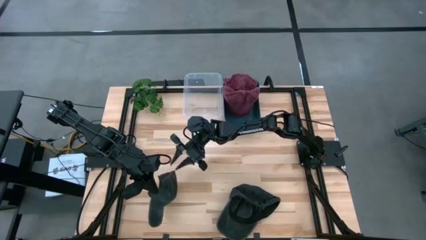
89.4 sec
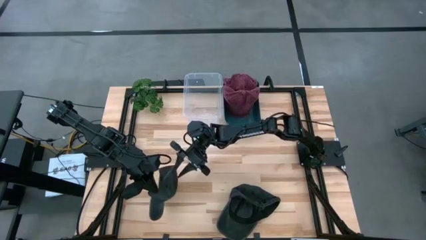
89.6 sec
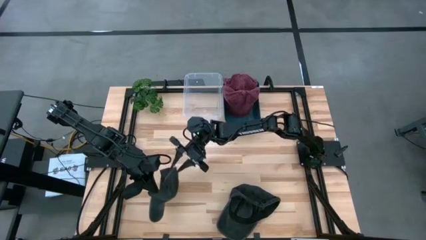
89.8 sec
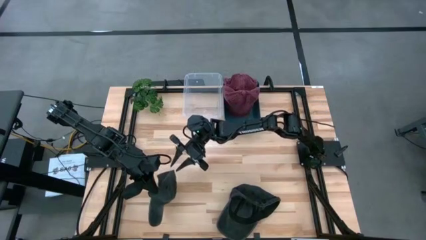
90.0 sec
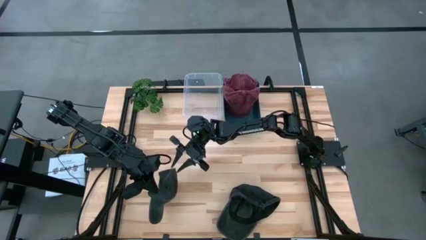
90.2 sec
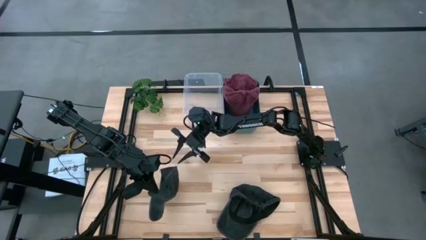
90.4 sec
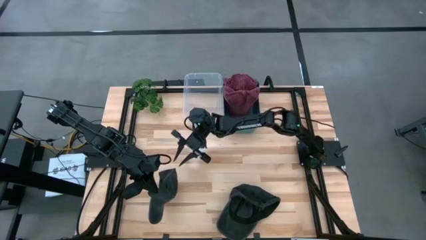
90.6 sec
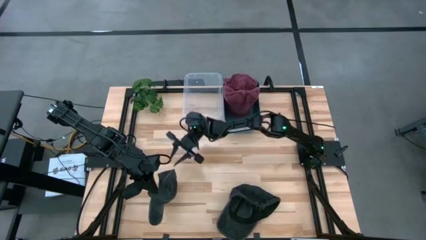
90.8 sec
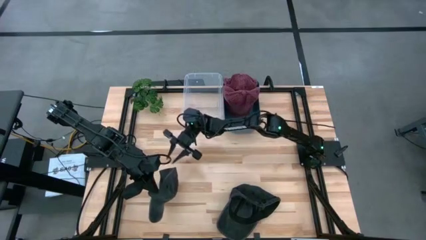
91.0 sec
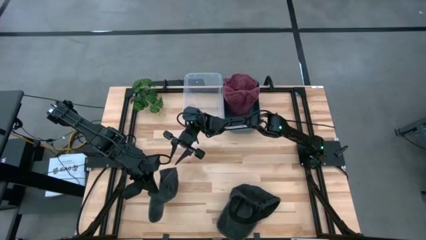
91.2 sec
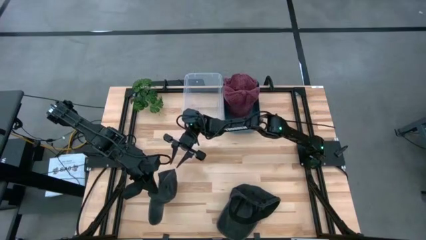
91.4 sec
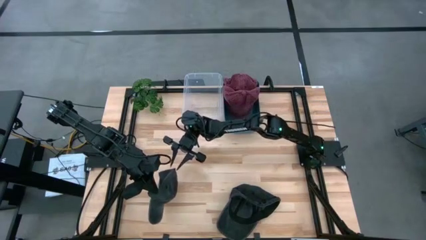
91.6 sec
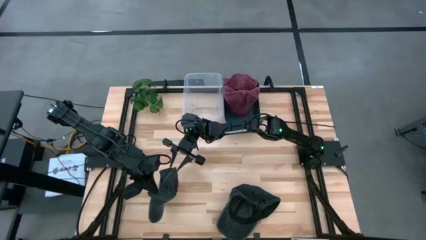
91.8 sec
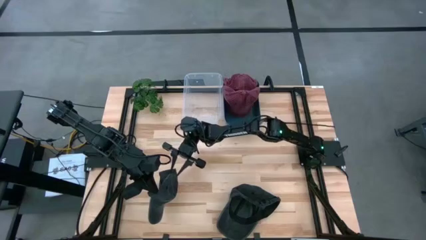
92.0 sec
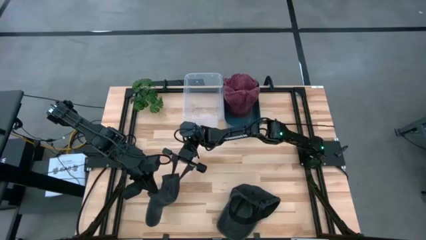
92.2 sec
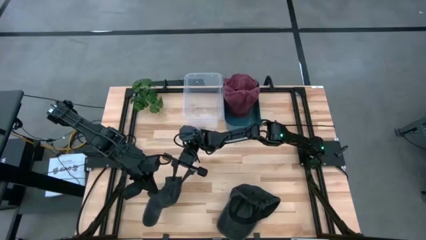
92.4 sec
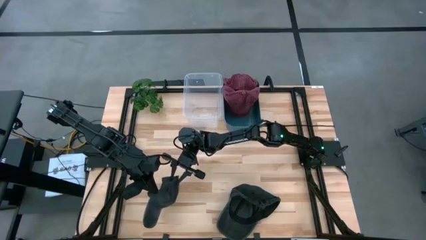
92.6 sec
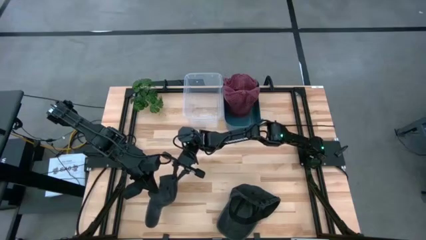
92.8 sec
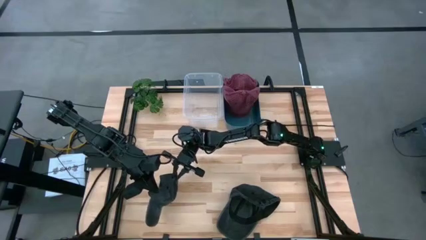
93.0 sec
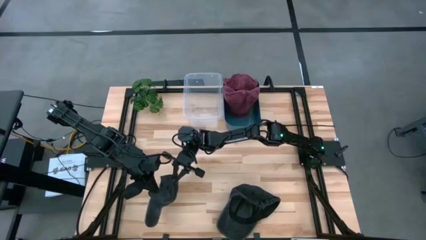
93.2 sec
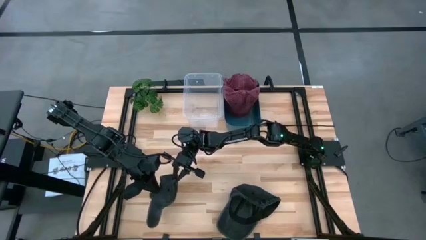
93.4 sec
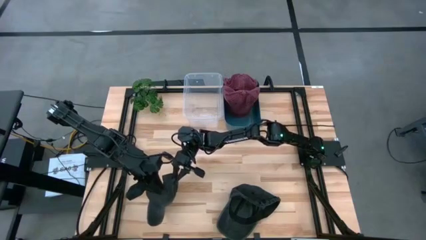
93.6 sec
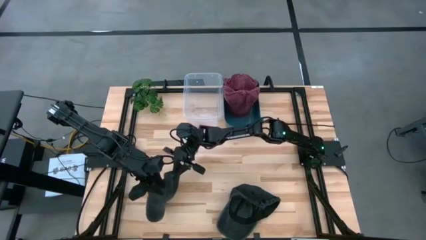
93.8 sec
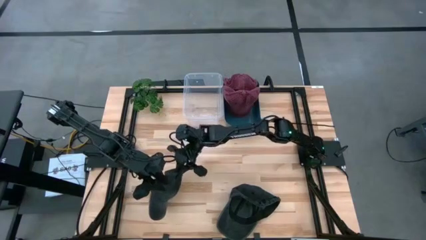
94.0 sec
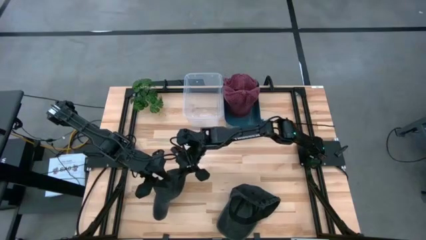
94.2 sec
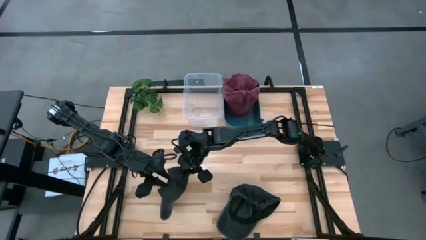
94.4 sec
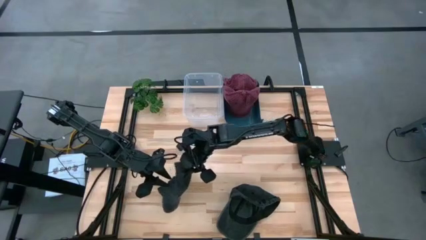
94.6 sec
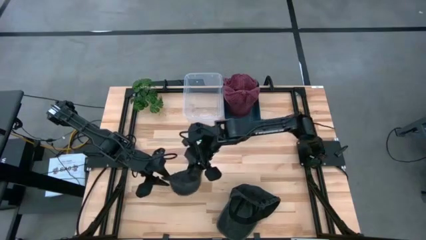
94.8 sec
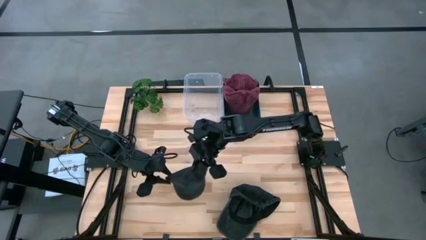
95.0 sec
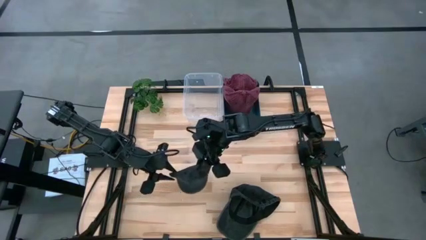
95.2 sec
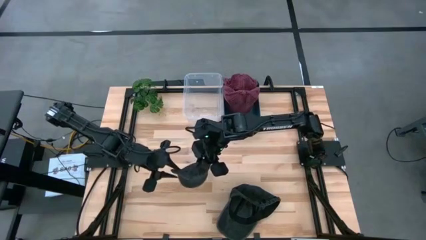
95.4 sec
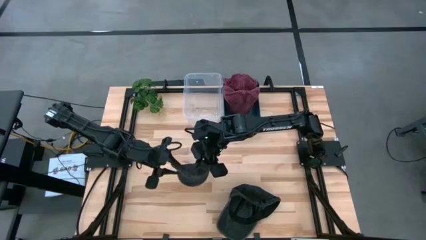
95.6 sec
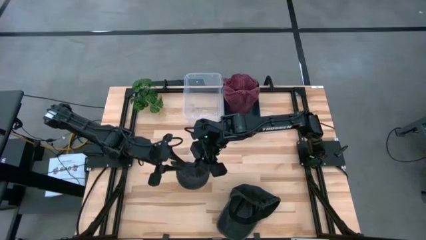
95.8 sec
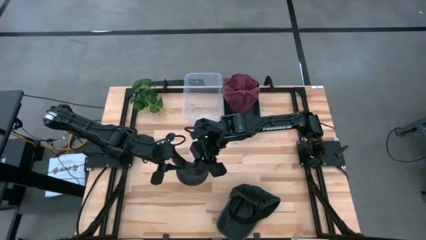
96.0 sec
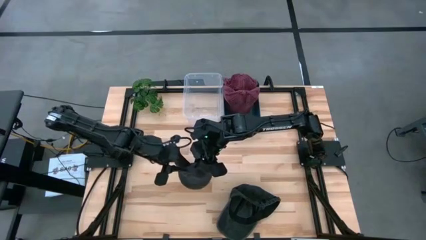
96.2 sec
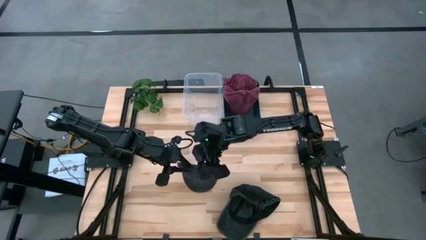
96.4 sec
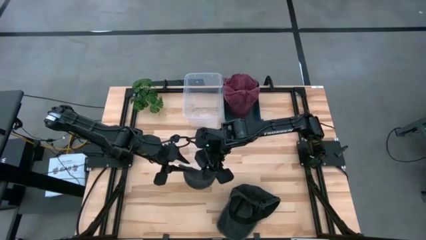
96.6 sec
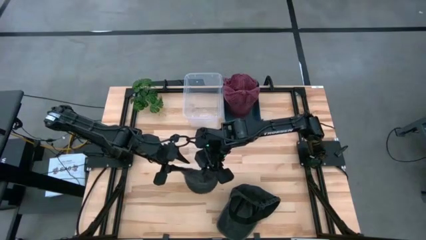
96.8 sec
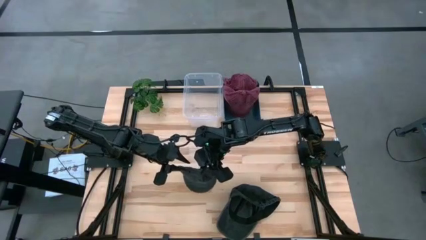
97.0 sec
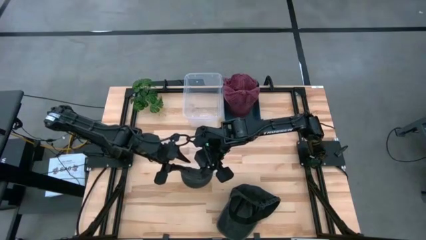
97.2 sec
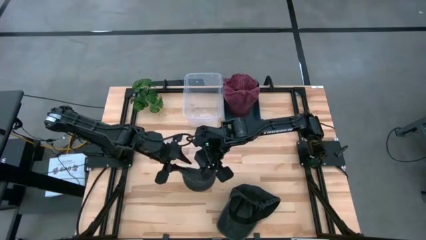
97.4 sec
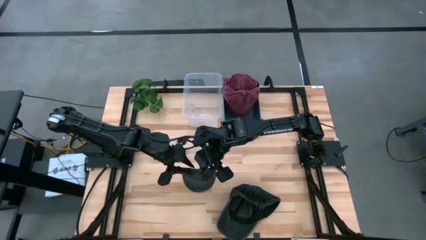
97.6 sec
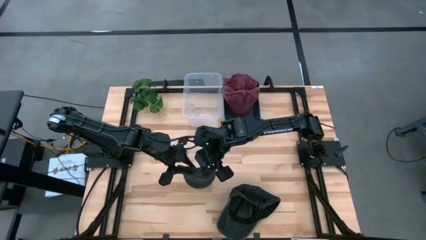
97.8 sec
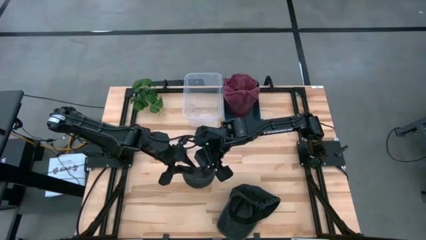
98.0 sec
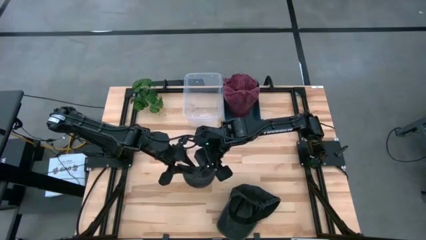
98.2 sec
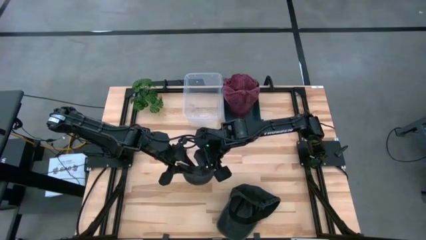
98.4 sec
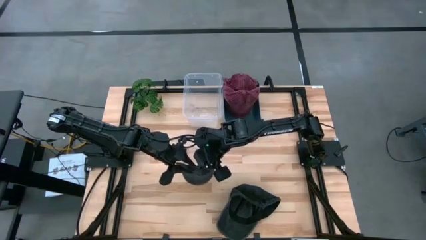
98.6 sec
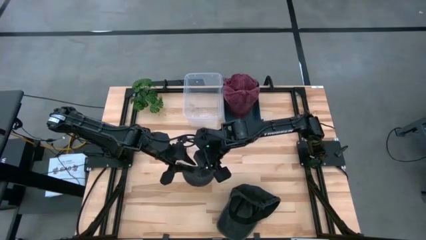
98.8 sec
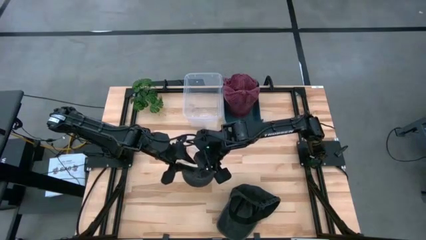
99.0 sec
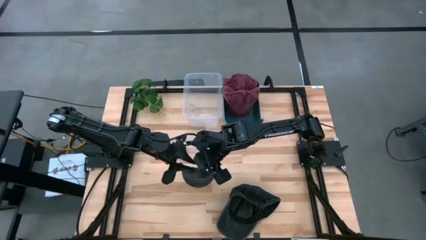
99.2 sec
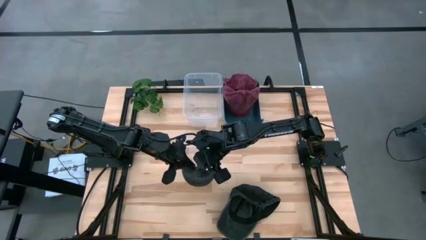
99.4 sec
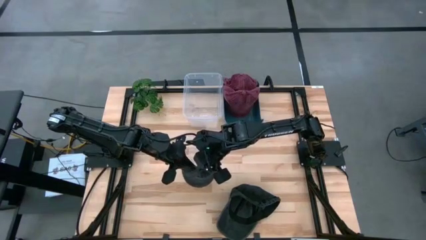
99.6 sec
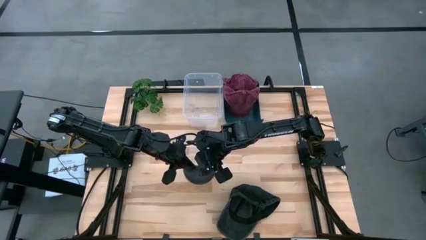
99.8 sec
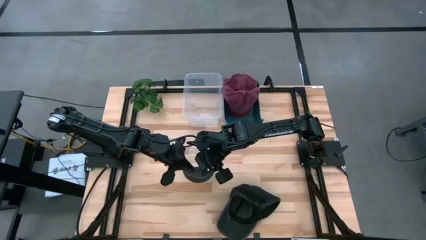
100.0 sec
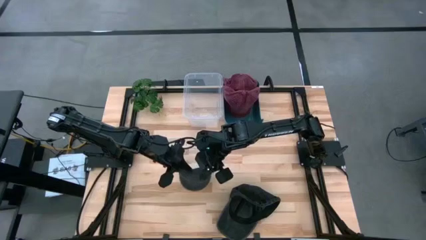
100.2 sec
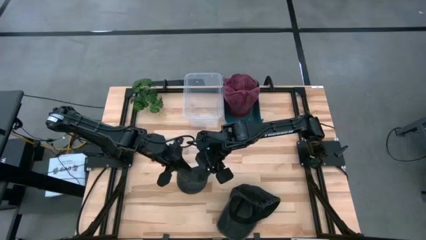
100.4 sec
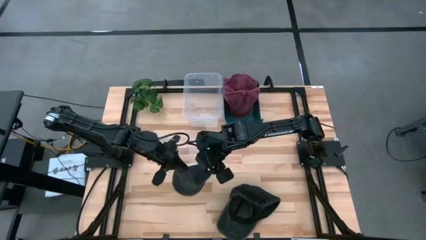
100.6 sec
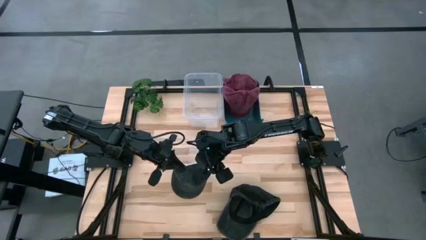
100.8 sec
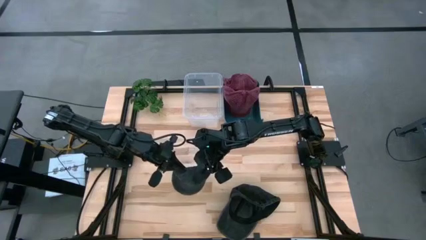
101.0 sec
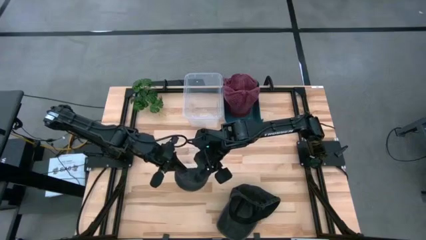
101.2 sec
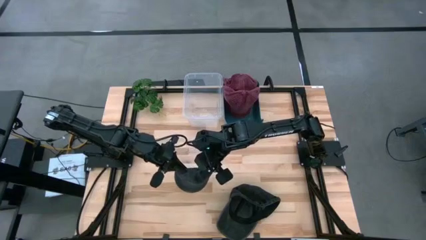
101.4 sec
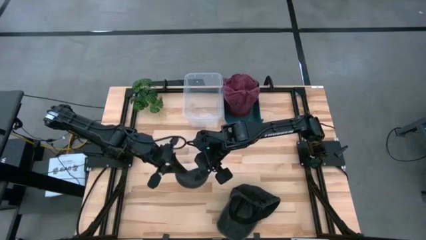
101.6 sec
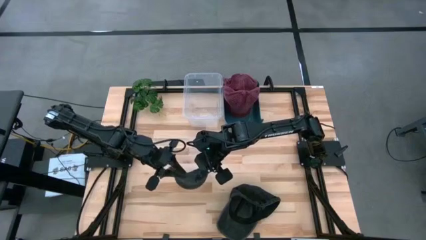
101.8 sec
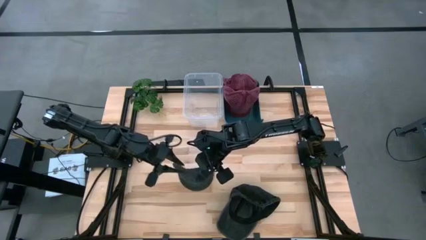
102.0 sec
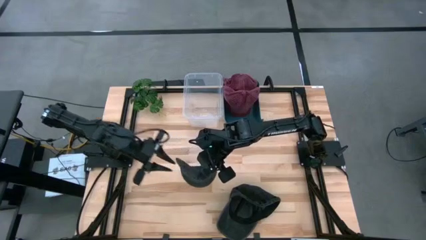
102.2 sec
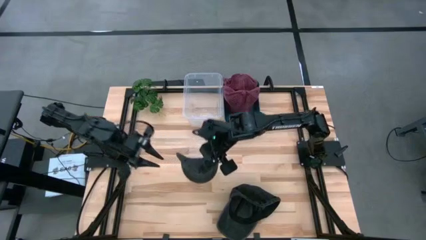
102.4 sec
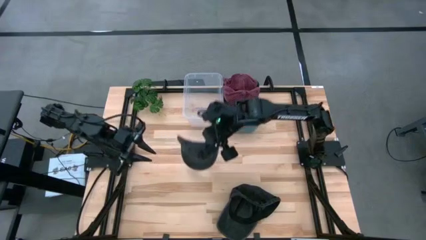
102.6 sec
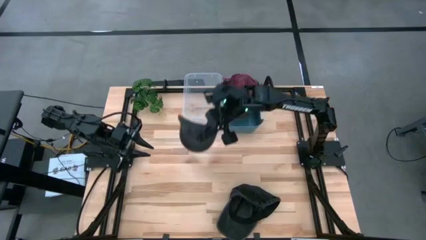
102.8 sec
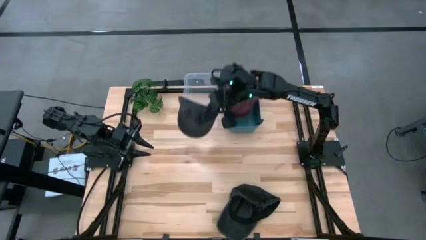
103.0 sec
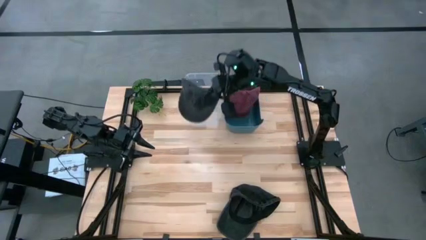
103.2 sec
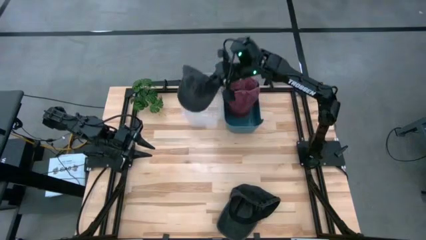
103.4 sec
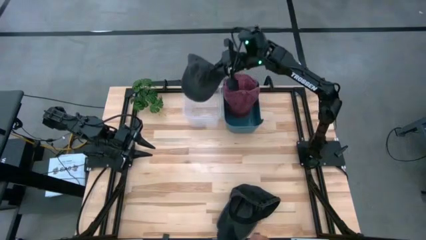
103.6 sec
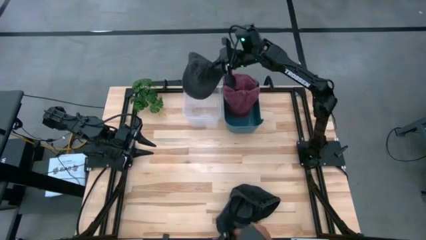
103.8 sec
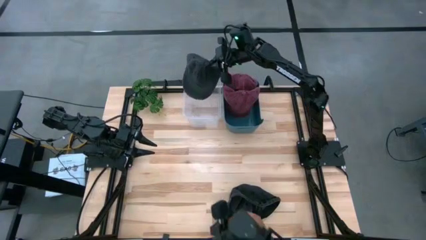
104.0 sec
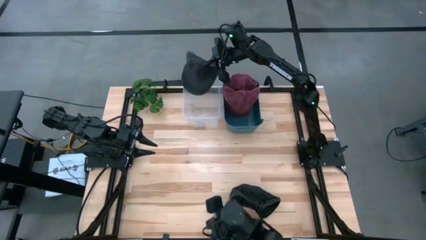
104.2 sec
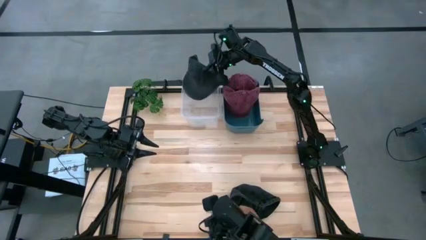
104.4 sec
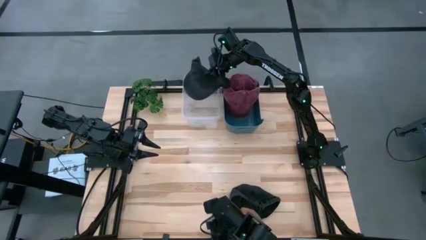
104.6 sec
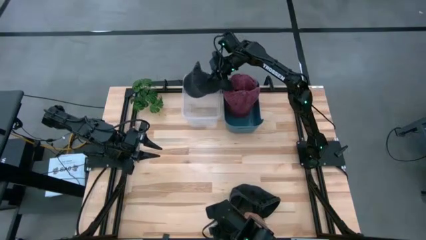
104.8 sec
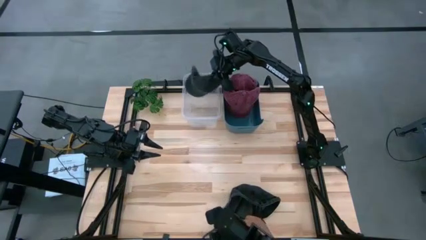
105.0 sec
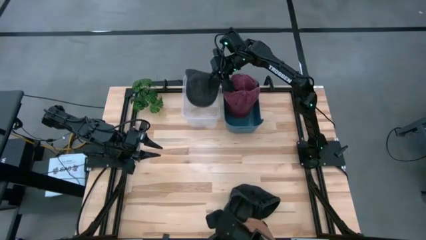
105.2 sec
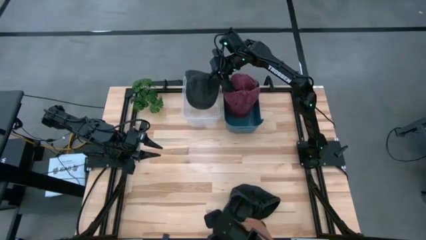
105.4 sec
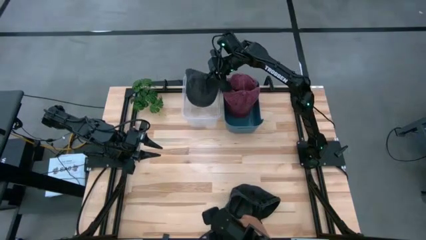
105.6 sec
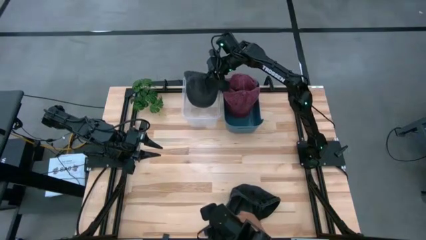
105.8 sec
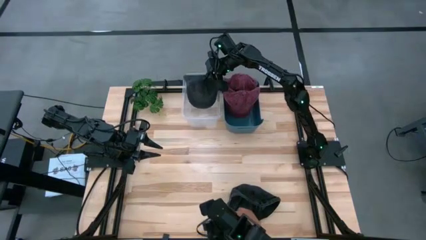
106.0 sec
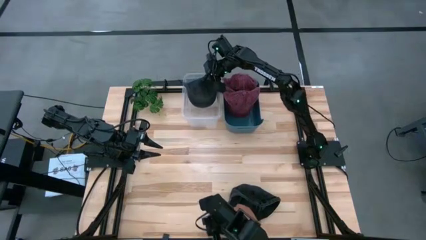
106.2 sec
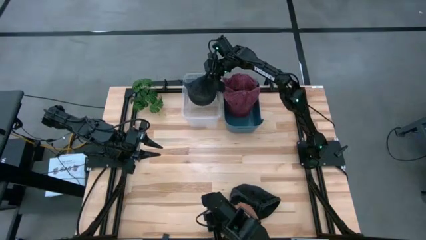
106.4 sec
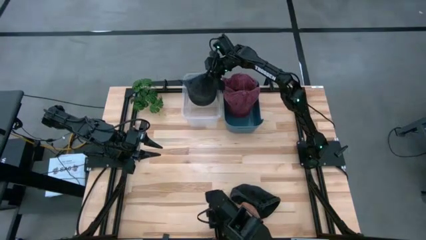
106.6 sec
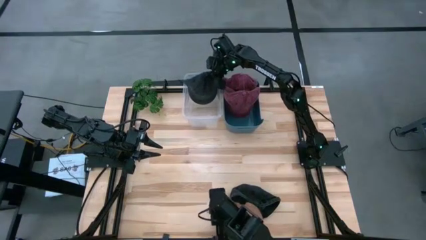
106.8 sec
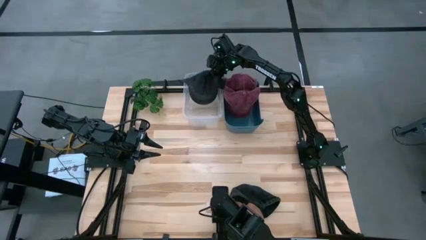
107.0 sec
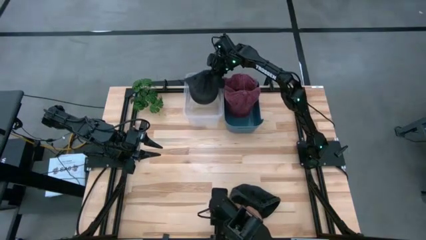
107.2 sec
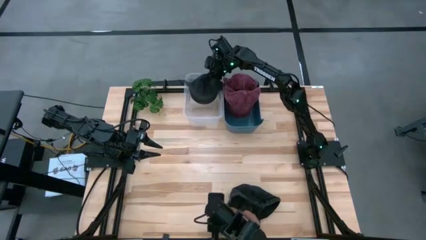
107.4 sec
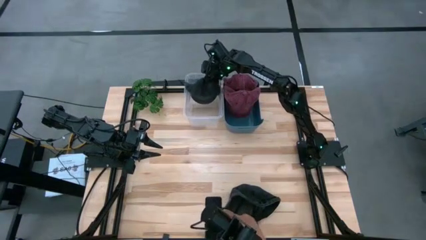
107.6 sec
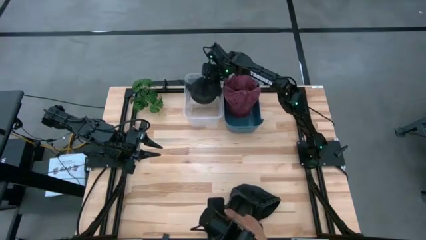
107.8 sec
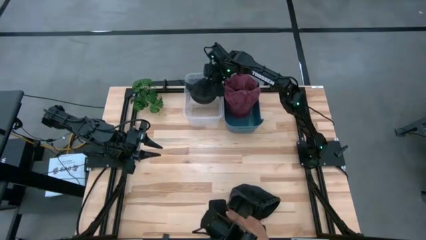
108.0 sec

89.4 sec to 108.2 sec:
Task: Pick & Place hat
Put the left black cap into the transparent bin
